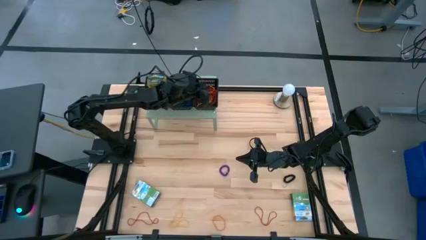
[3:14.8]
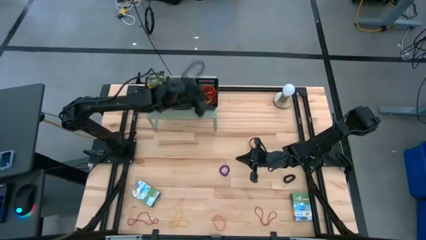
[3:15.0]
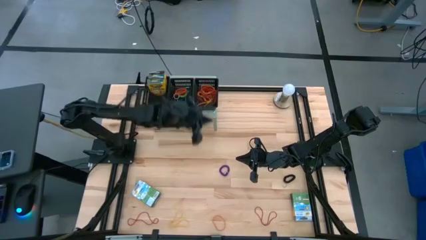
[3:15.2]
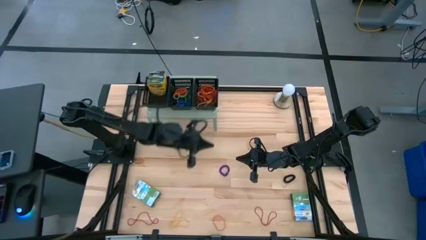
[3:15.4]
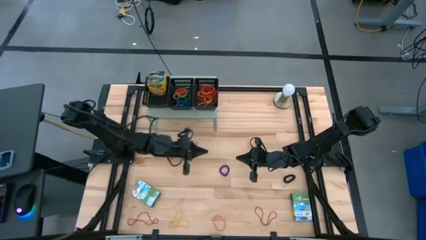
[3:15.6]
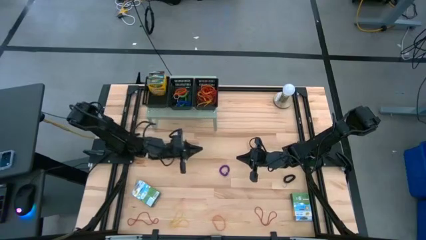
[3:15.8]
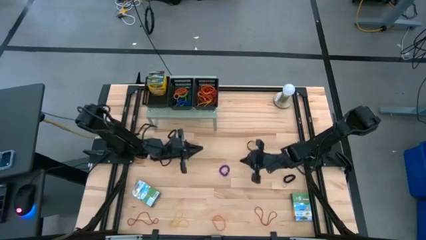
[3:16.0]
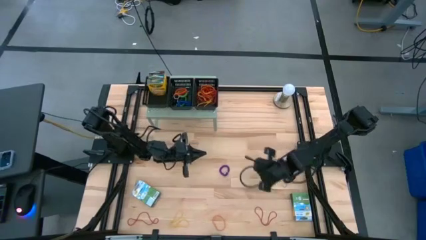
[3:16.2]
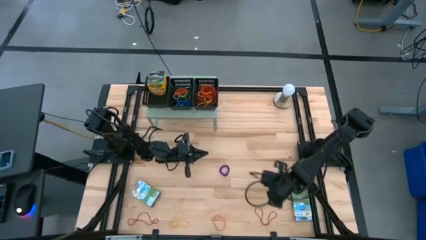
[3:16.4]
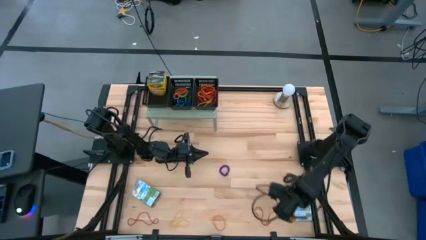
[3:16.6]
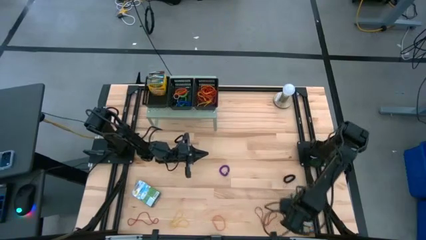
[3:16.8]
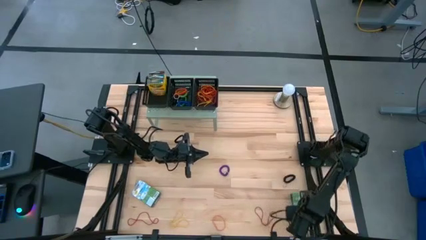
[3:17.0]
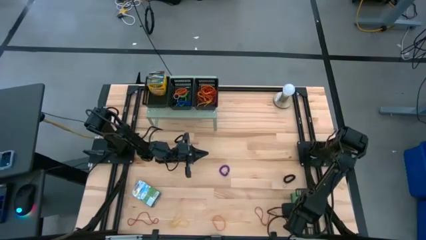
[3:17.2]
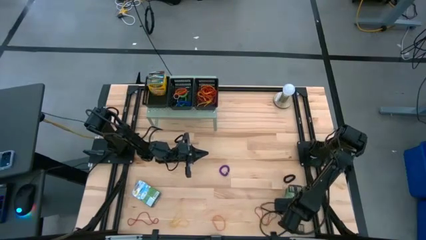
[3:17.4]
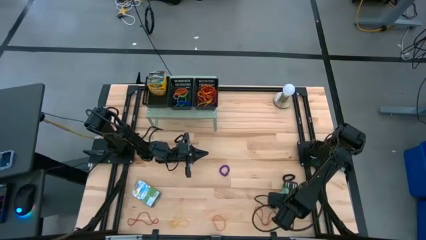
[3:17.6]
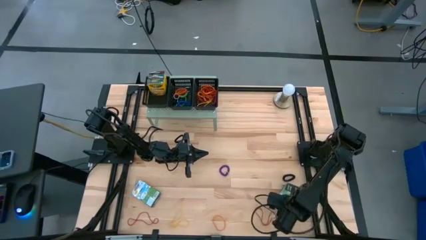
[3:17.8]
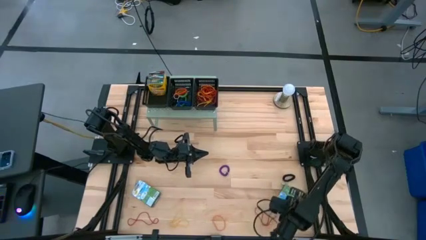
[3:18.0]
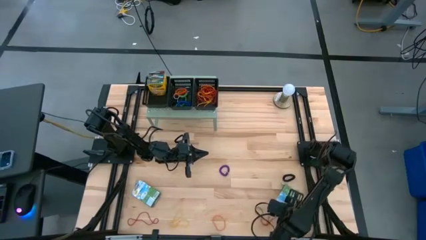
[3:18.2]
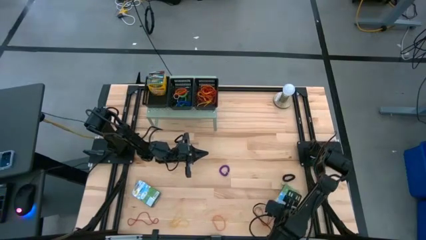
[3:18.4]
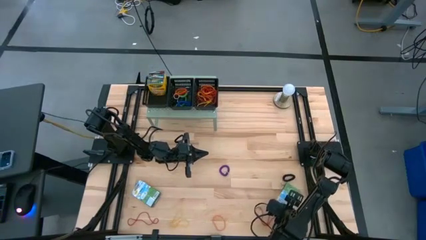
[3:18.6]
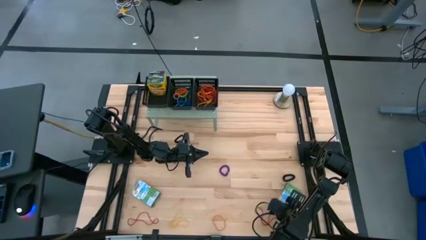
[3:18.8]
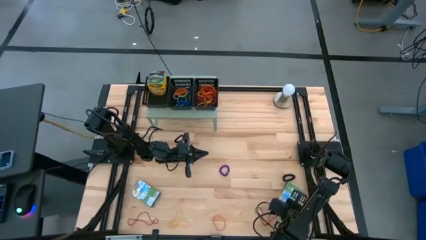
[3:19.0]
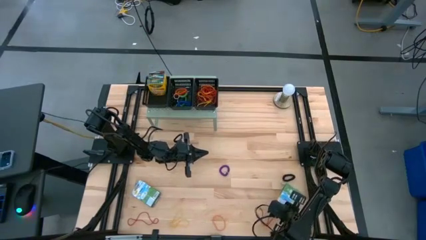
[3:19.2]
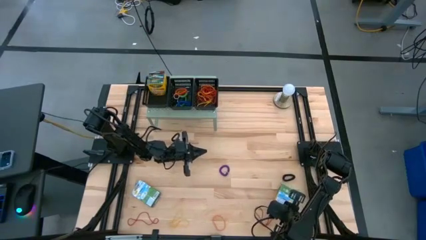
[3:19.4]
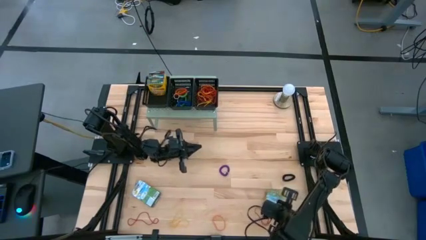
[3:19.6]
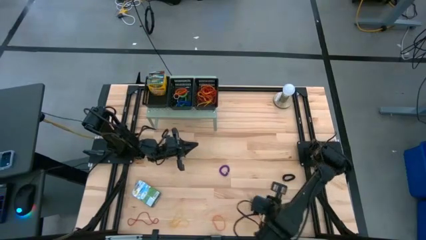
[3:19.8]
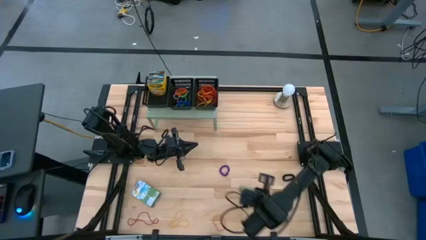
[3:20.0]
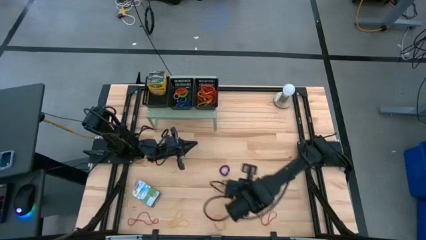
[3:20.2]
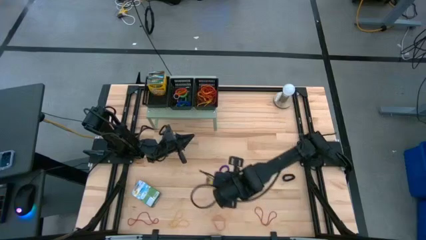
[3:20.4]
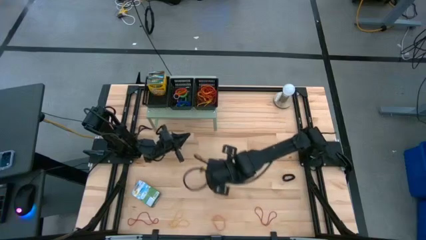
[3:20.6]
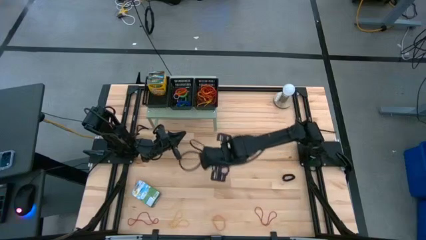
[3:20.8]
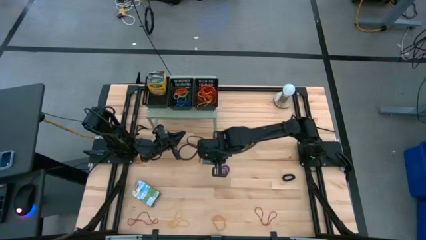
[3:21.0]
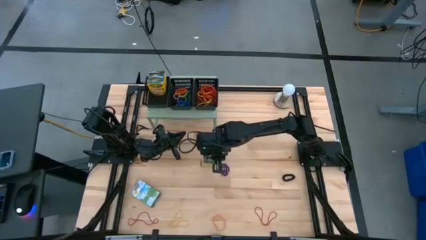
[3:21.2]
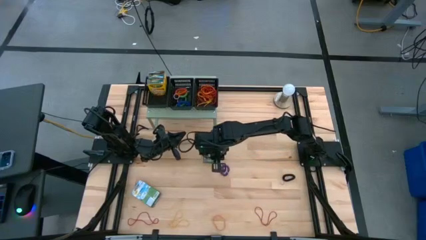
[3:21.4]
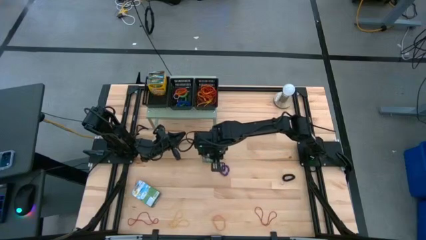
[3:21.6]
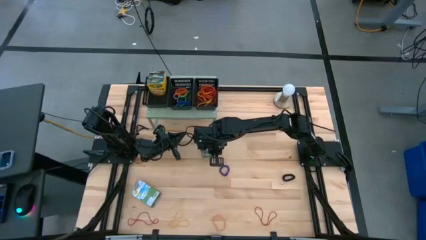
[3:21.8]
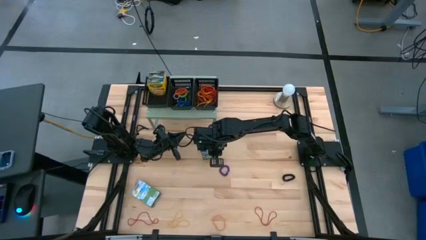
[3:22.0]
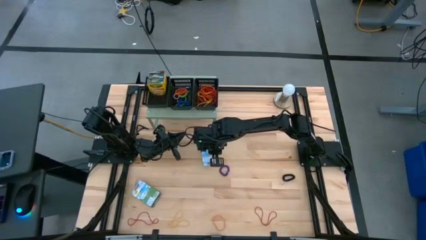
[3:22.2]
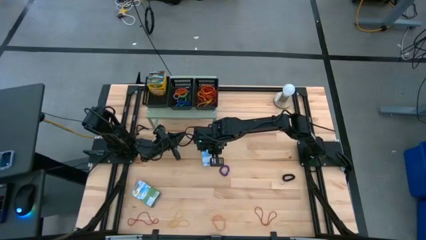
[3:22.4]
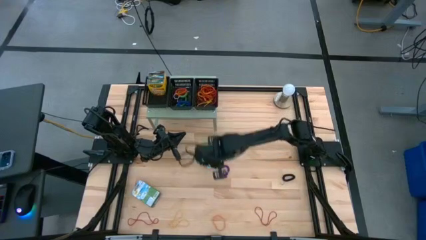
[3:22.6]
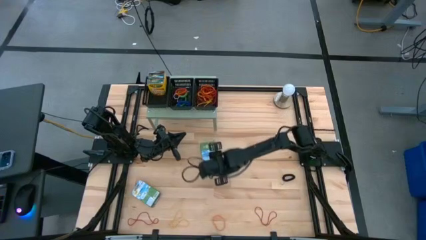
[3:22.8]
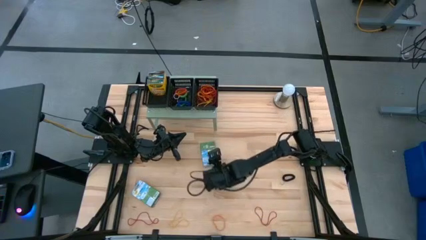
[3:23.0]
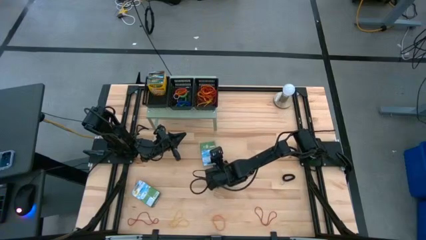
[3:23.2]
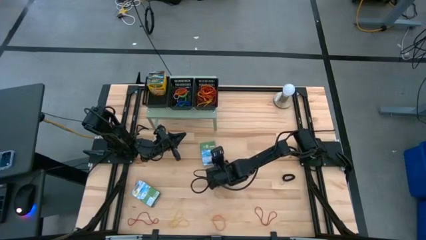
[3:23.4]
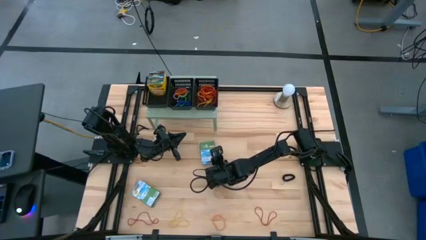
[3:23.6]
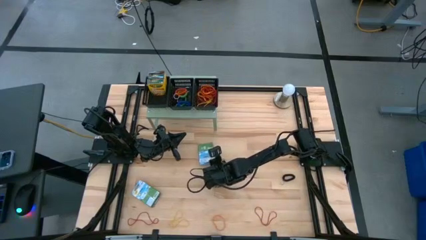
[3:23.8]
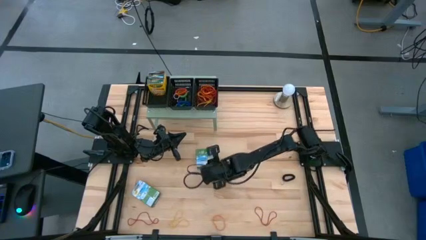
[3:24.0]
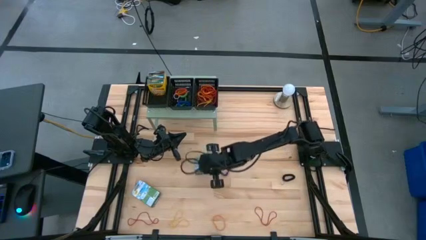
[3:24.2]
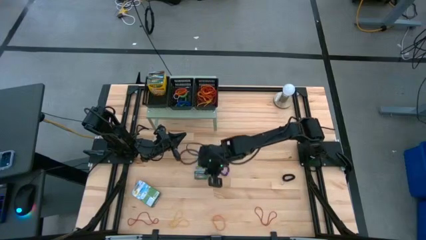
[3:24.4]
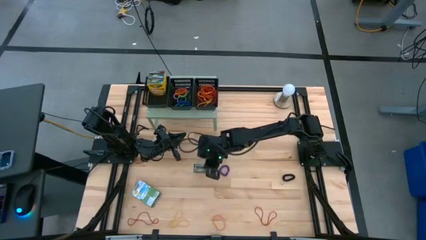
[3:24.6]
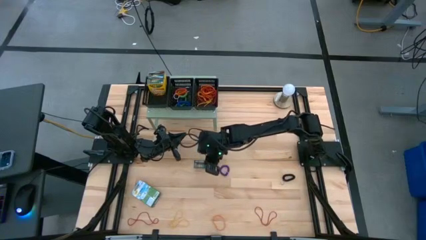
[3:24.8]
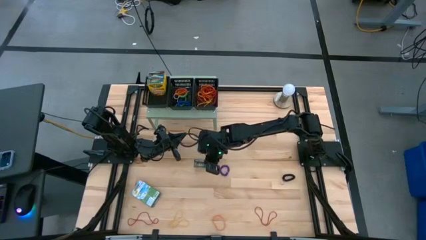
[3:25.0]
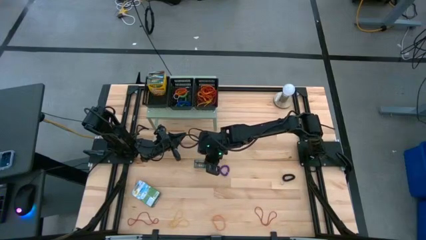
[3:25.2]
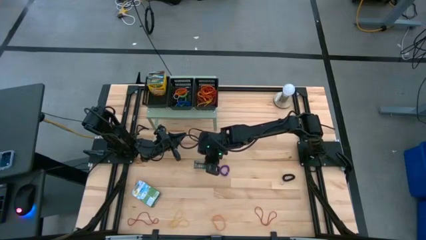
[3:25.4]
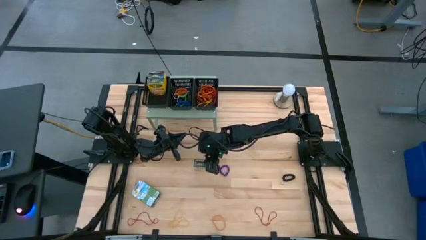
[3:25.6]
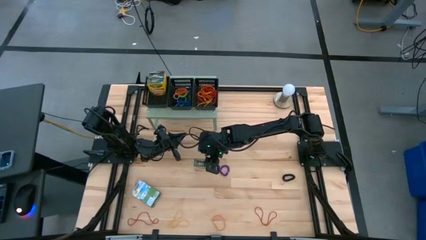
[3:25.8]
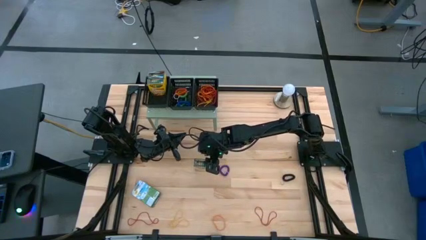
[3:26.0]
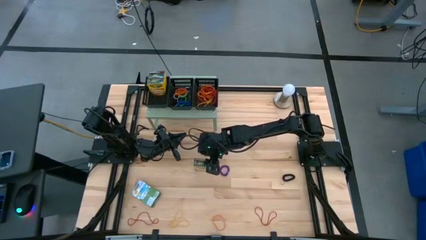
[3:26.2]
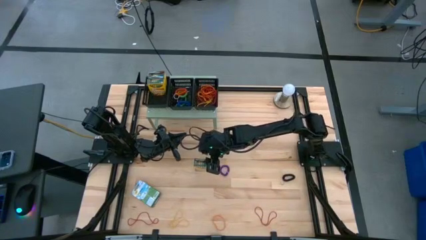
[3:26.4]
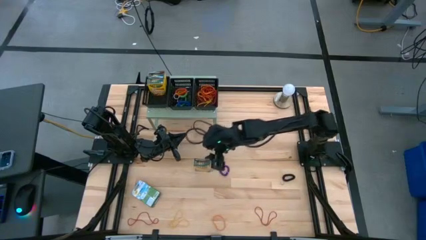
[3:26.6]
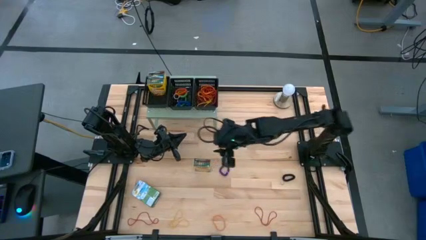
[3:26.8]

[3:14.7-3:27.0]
Task: Pick & Place Office Desk Supplies
Put the crayon box into the left black bin on the shelf

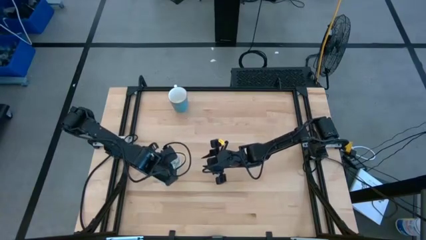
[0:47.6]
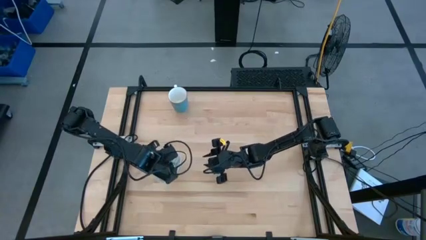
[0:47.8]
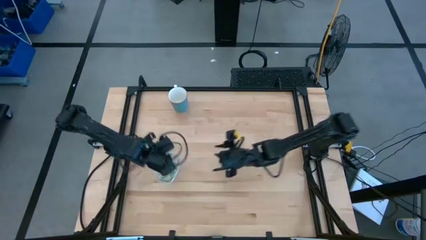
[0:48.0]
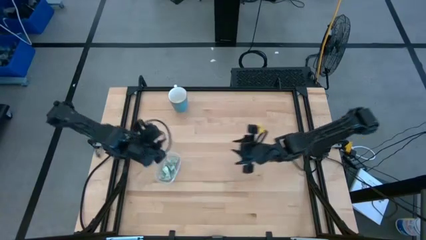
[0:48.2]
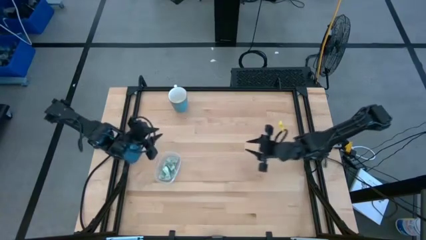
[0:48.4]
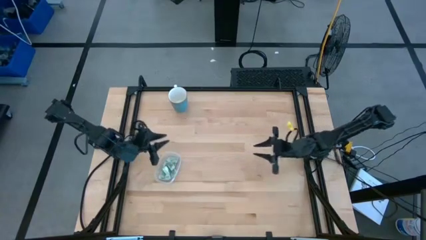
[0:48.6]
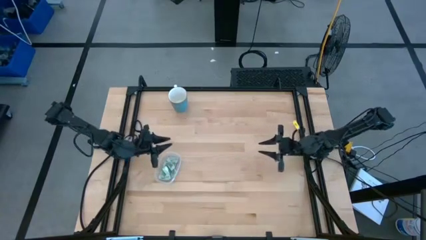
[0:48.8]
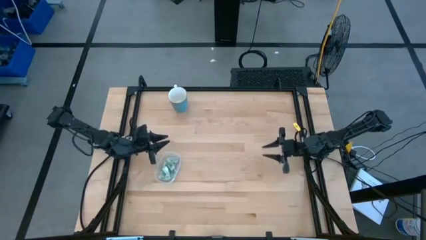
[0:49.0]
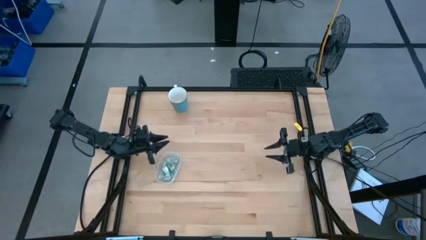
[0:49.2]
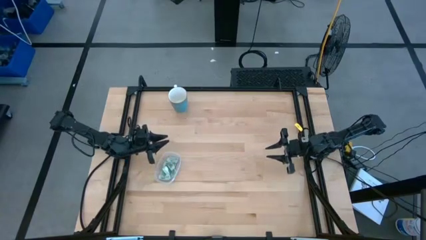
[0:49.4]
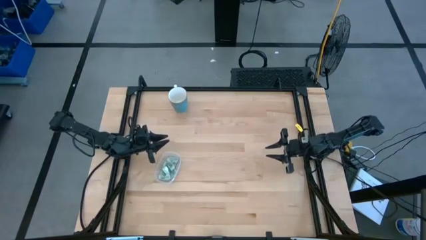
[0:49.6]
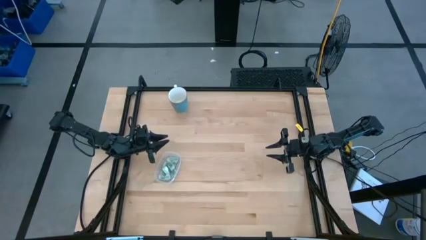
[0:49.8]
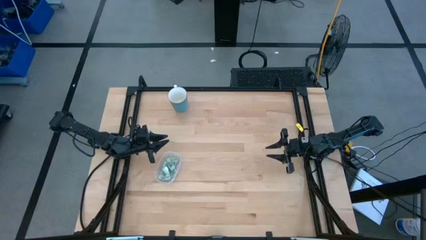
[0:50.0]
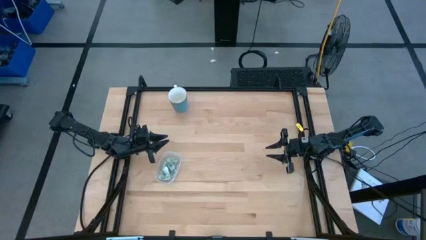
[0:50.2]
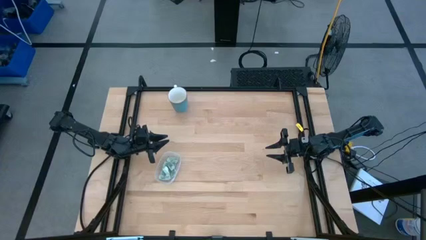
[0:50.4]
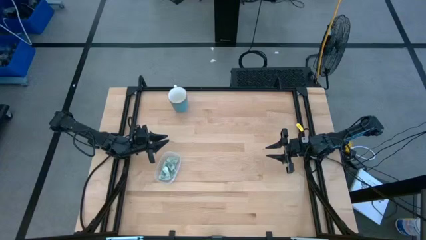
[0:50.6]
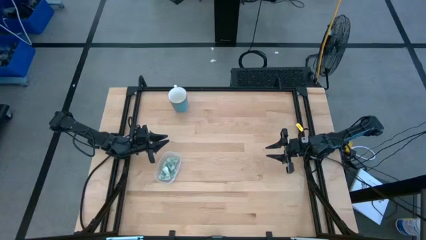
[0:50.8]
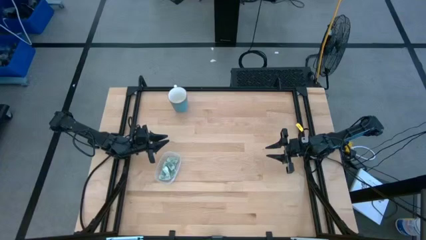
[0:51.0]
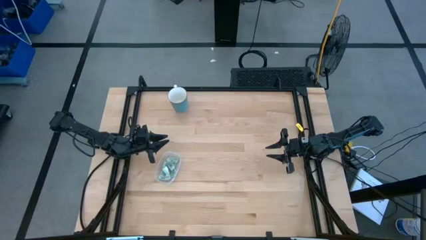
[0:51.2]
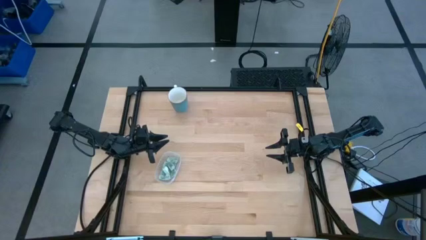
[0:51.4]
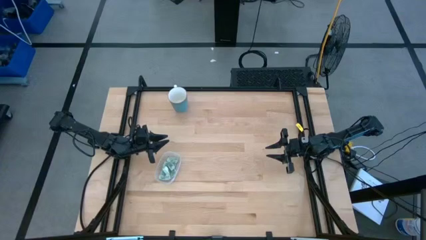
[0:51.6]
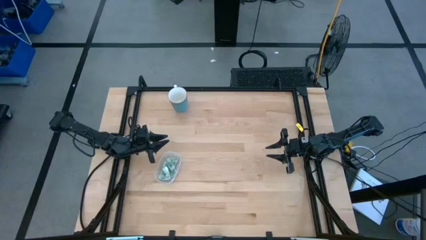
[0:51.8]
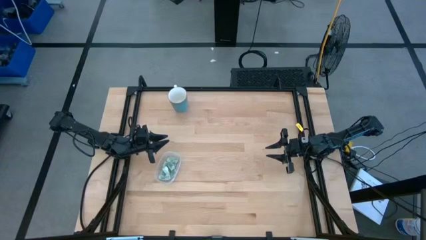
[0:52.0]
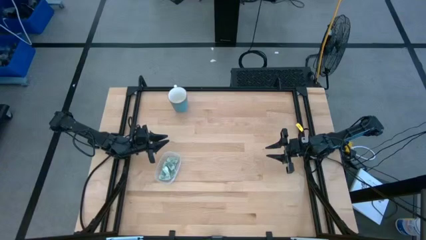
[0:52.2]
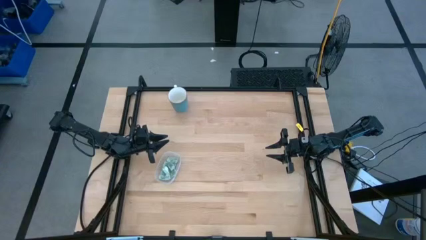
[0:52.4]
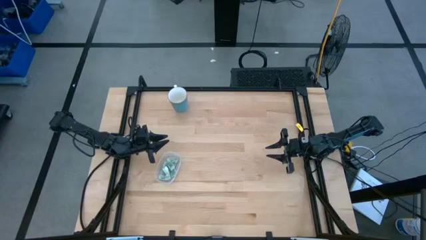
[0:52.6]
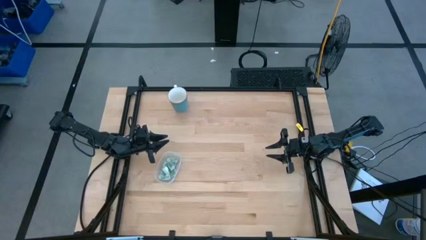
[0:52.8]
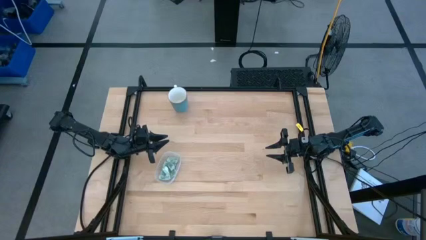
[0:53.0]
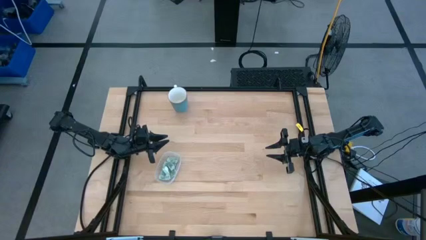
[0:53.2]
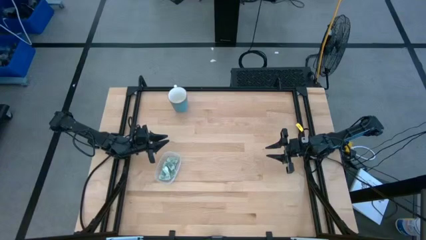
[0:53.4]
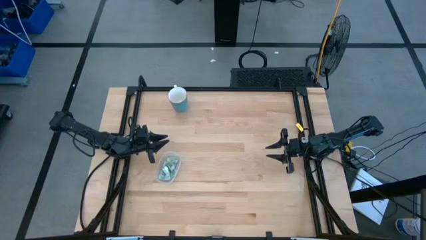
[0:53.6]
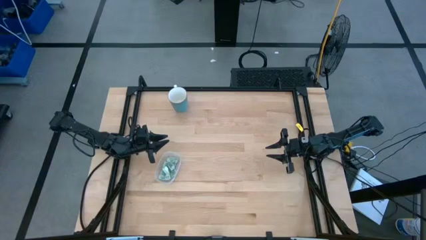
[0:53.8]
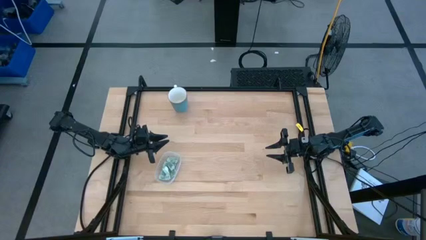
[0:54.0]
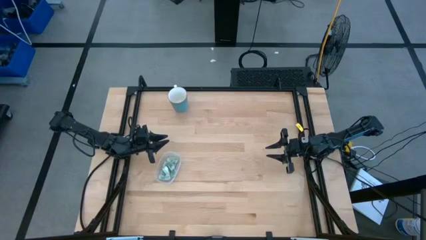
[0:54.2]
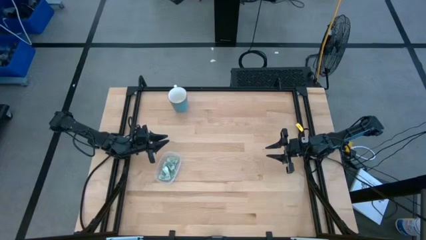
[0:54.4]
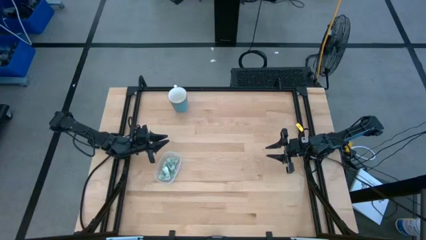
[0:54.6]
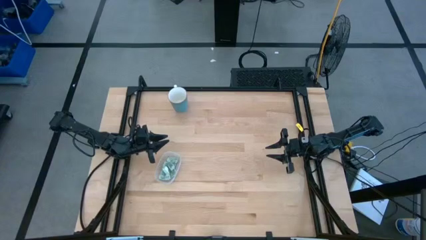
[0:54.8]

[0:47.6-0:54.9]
Task: Pick and place Stevia / Truvia into bins
Return to Home Position
